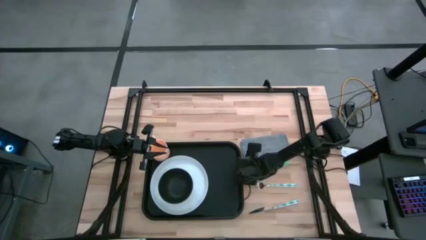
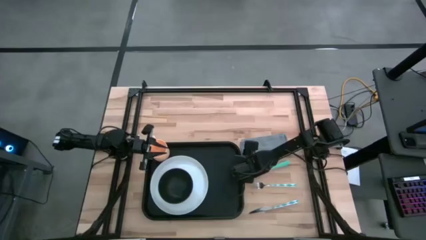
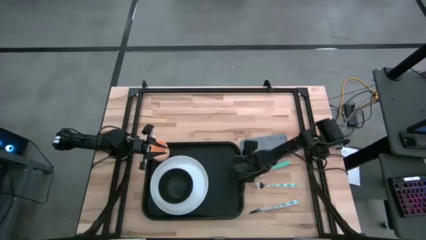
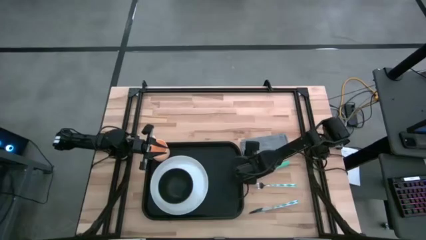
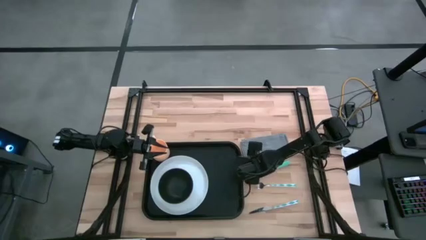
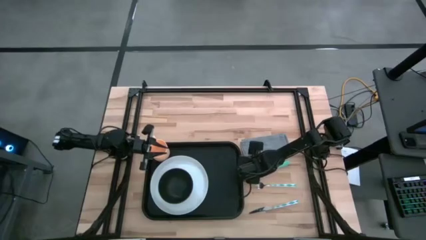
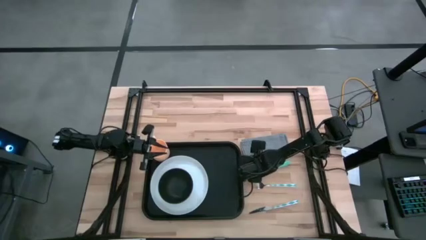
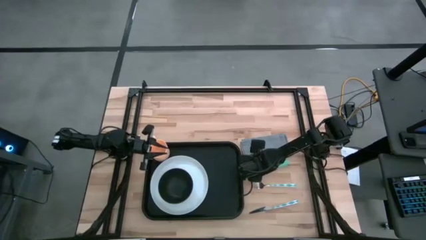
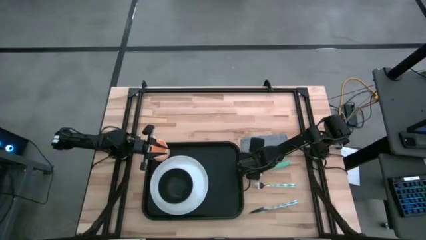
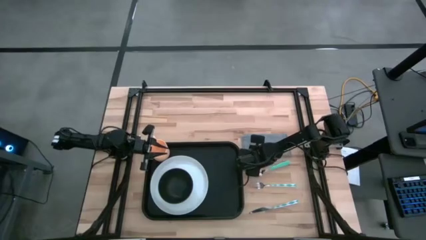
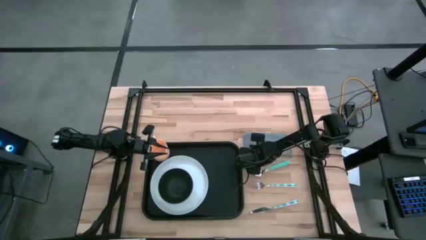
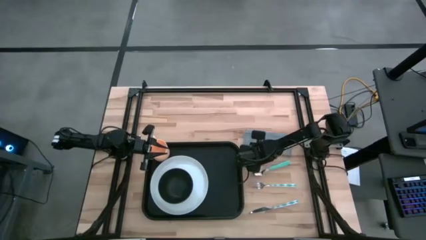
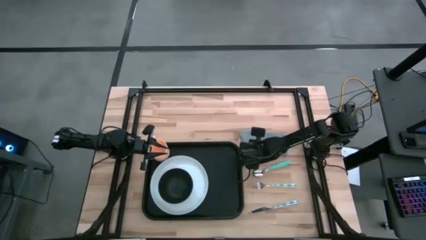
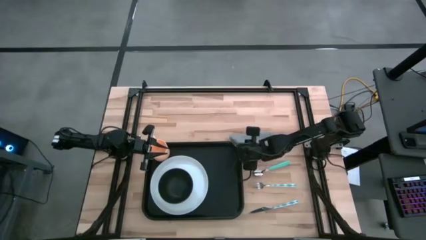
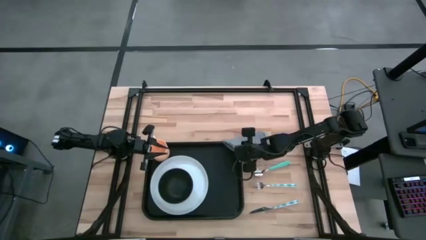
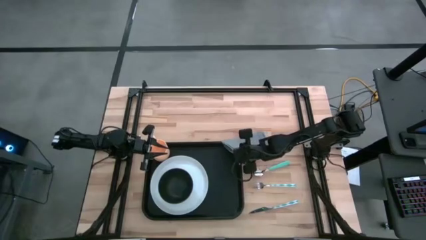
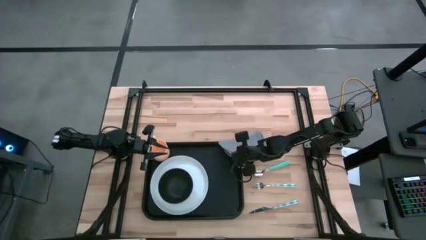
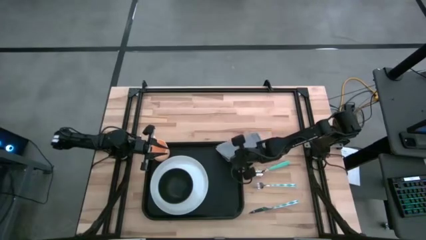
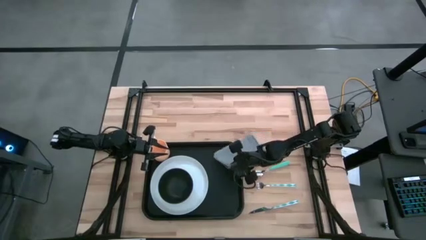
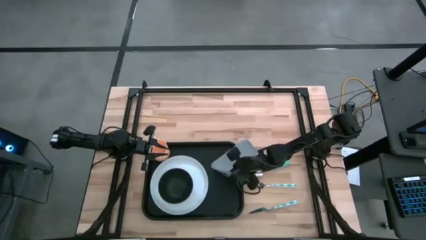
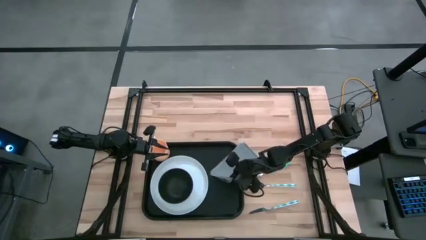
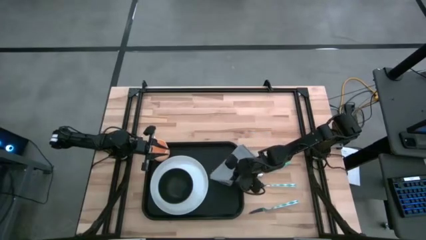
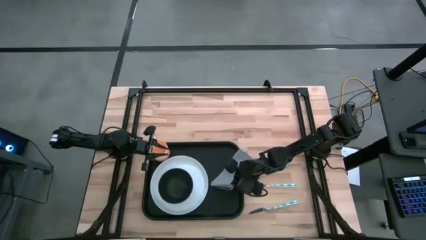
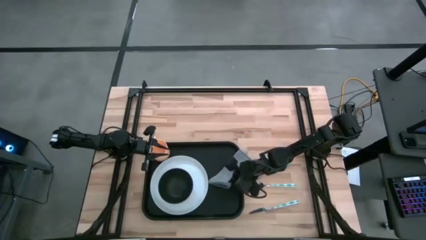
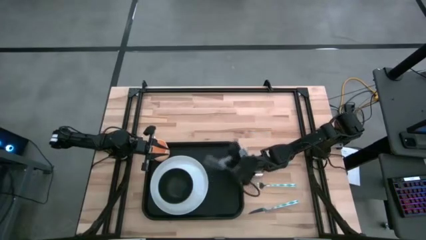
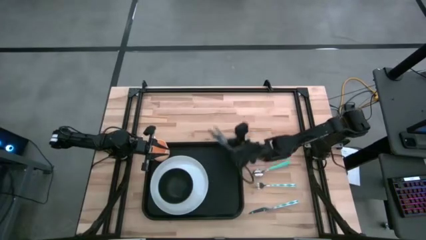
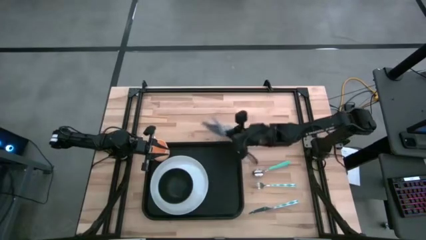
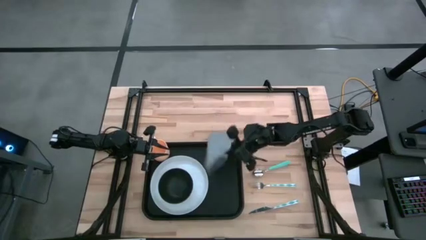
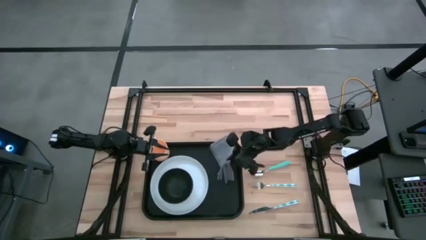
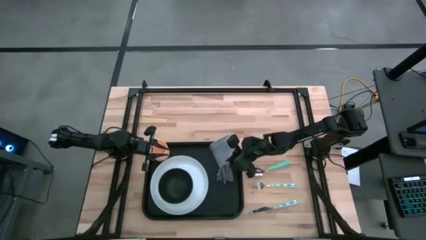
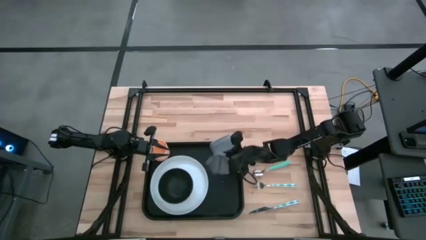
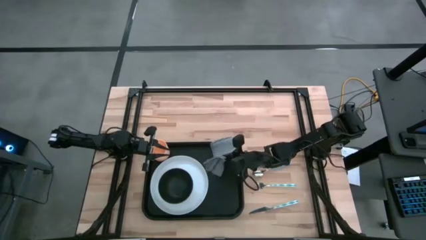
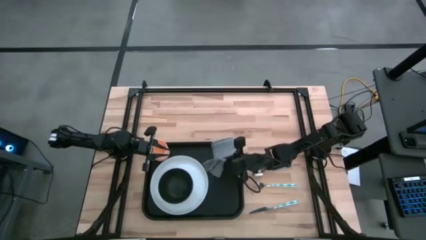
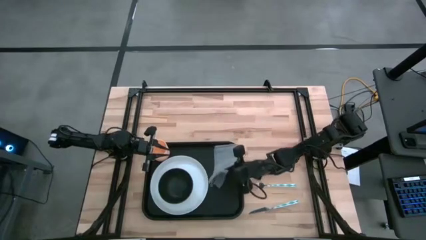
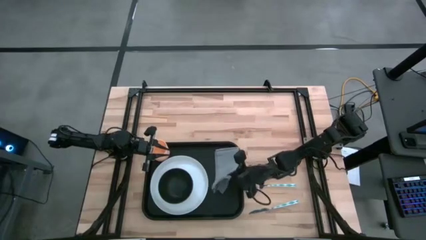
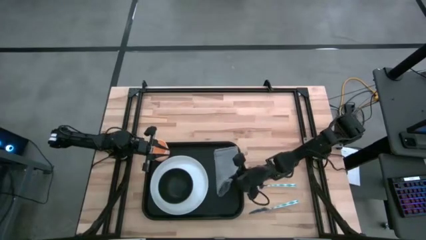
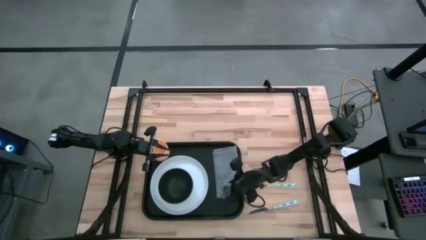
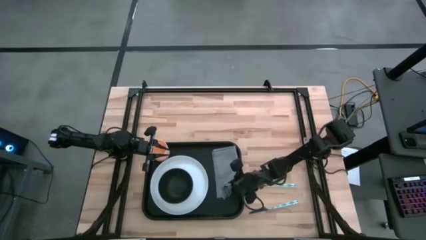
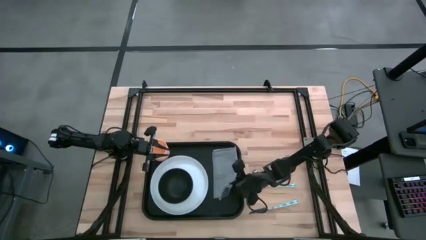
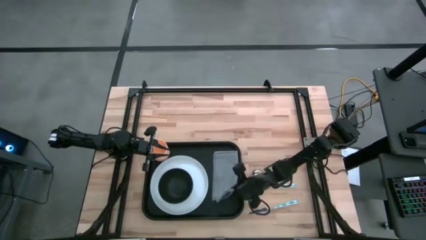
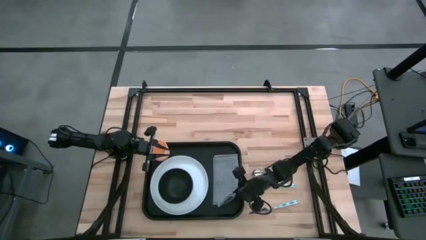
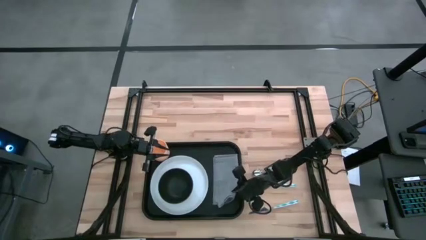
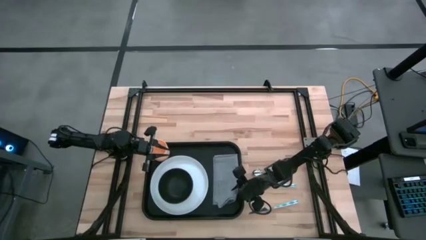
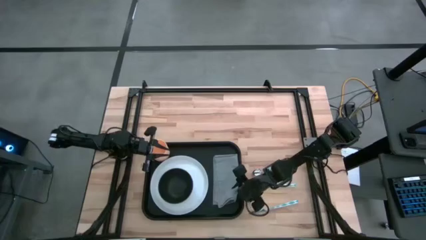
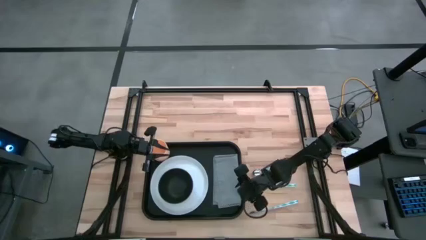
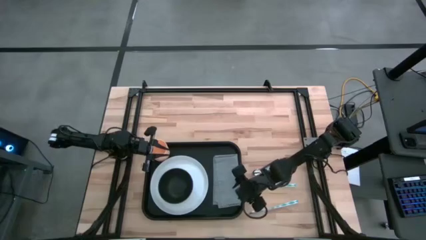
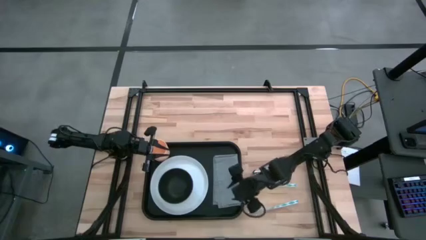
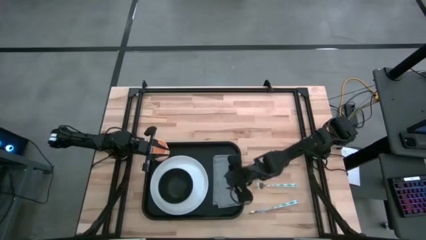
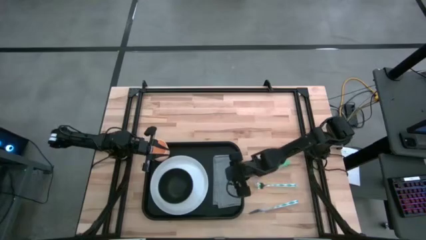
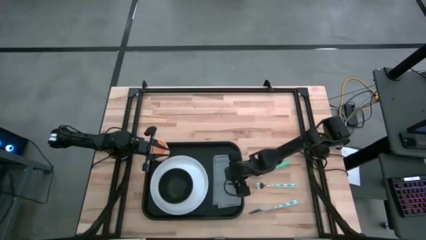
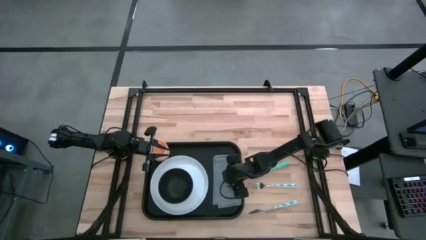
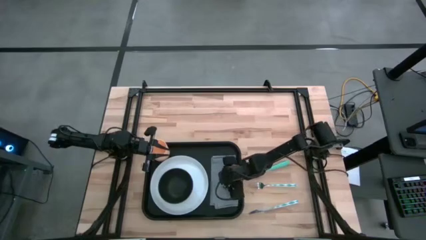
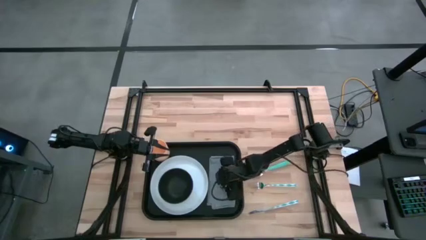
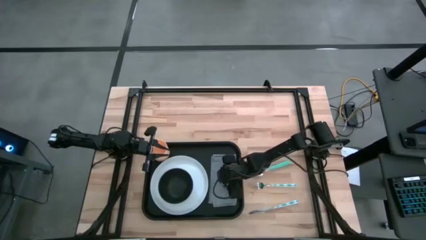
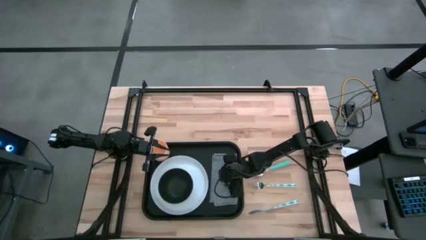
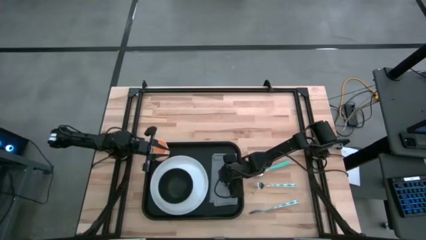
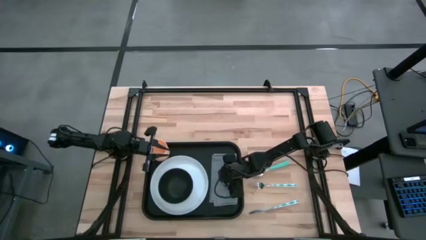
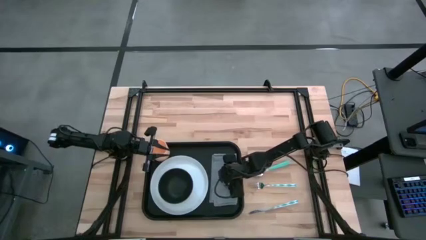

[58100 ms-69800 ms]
Task: Set up tray
Put the gray napkin to the right of the white plate on the black tray

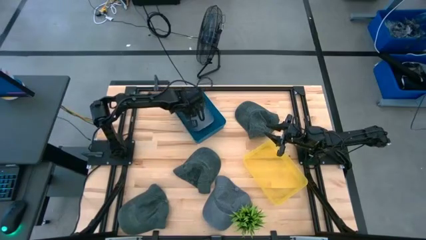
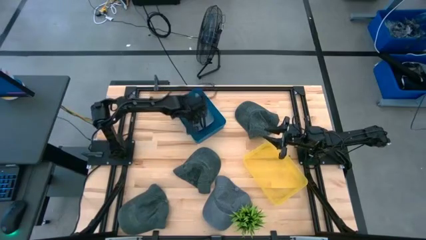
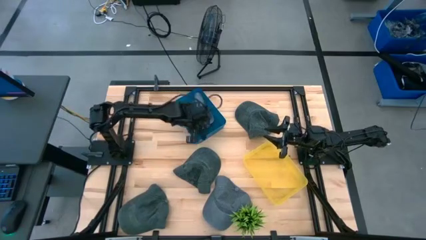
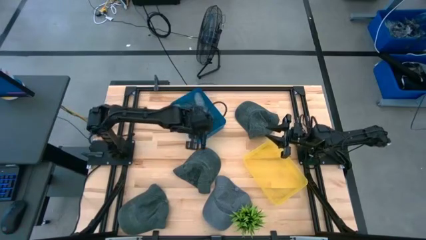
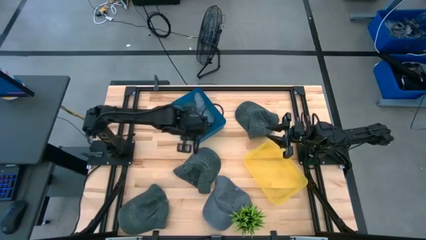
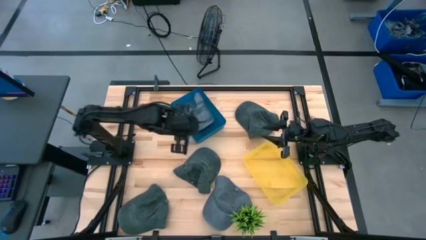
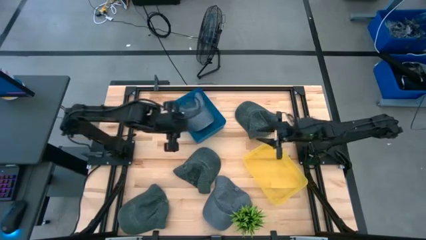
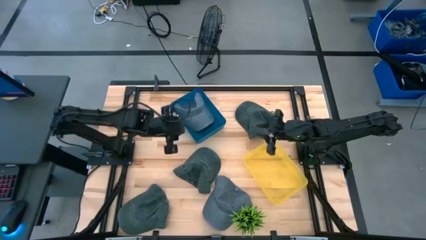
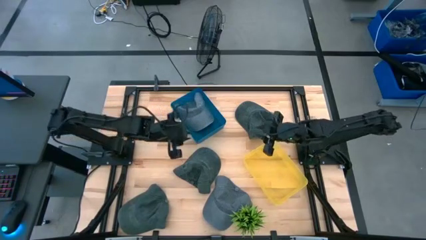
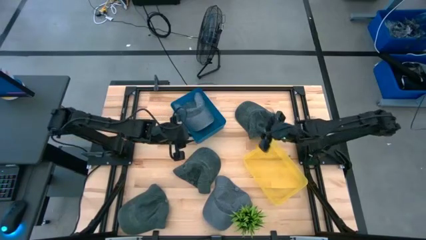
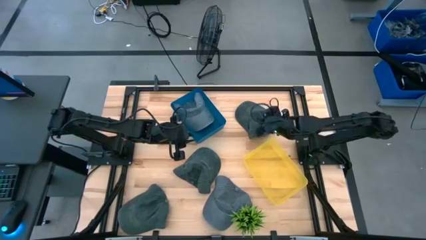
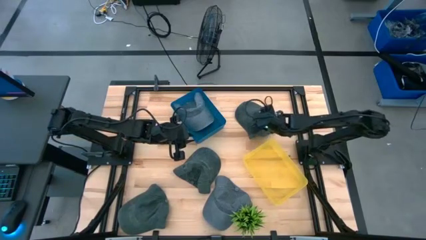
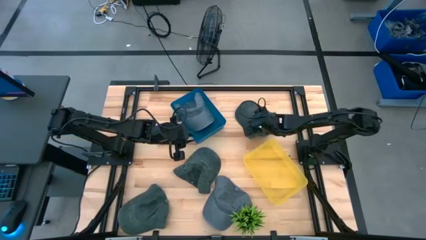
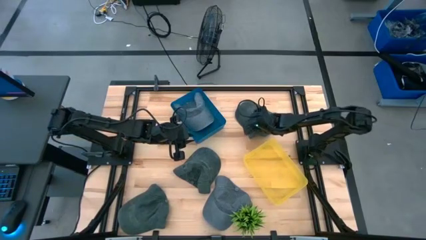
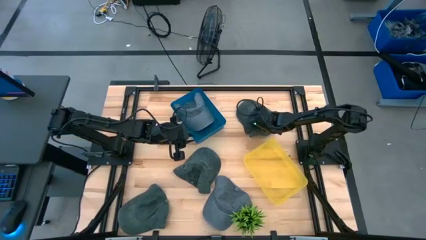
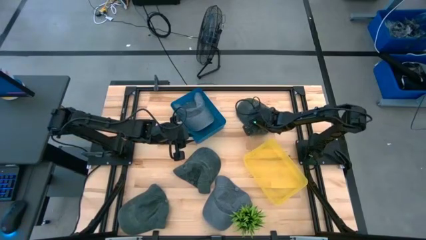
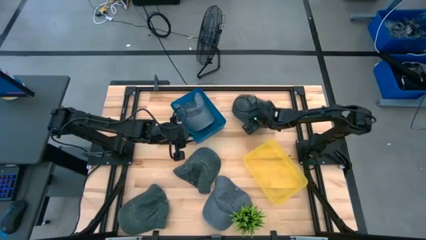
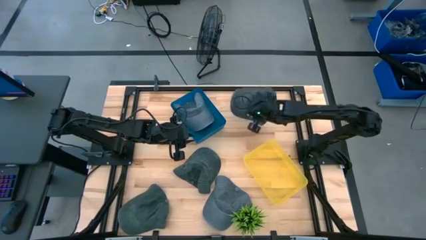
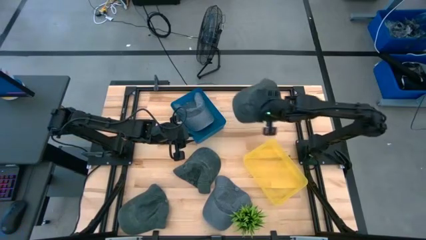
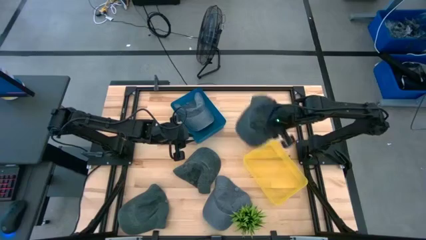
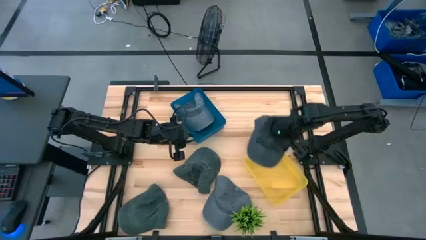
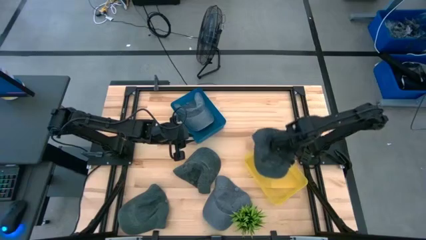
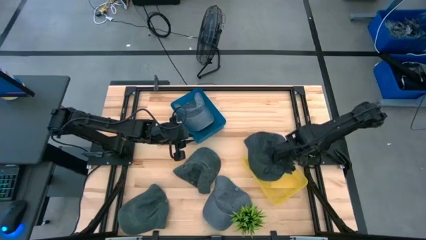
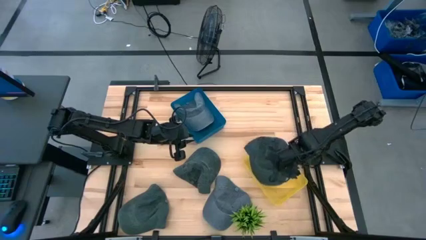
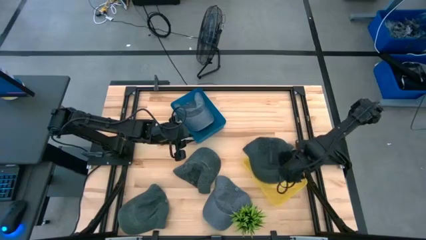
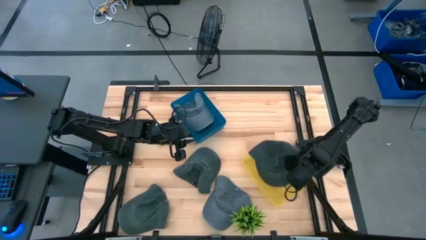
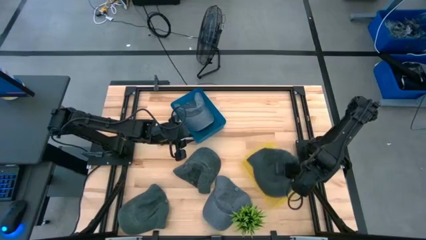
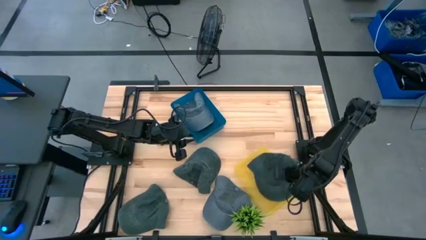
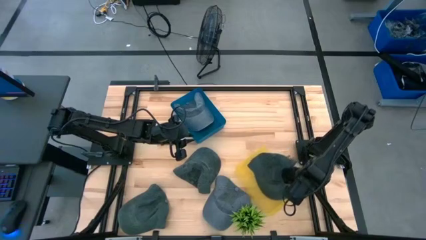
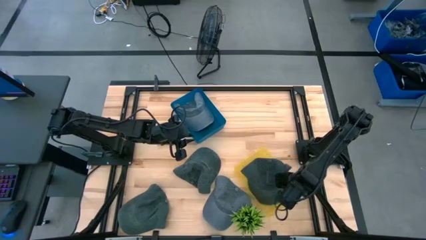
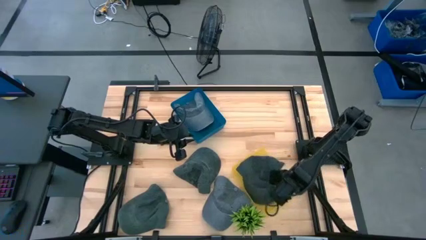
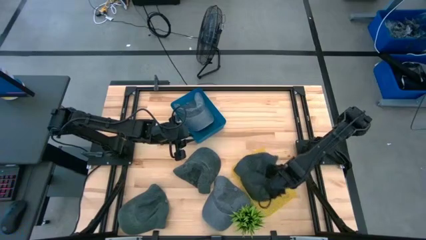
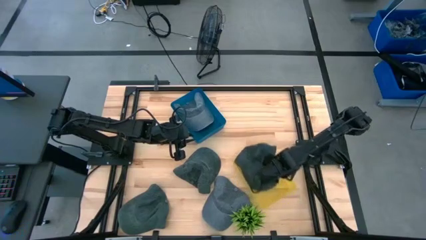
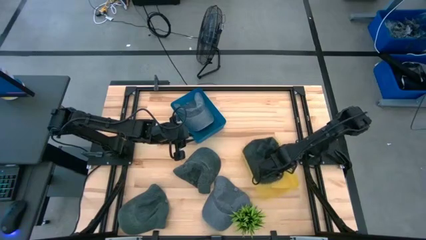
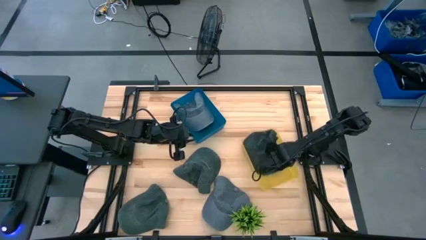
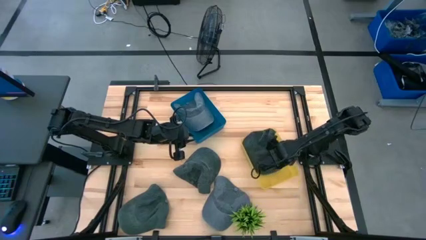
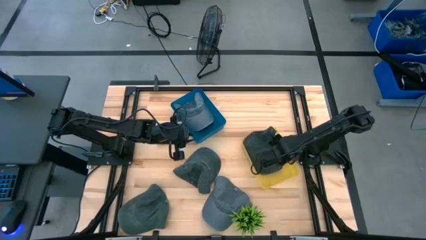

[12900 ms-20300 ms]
Task: Pick & Place hat
Put the top black cap into the yellow bin
